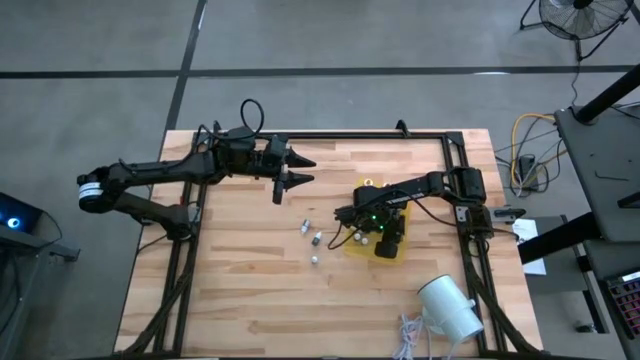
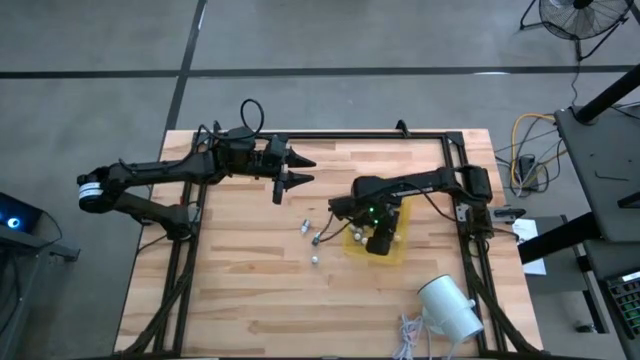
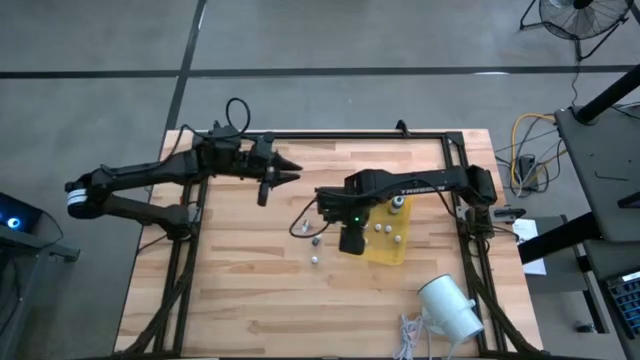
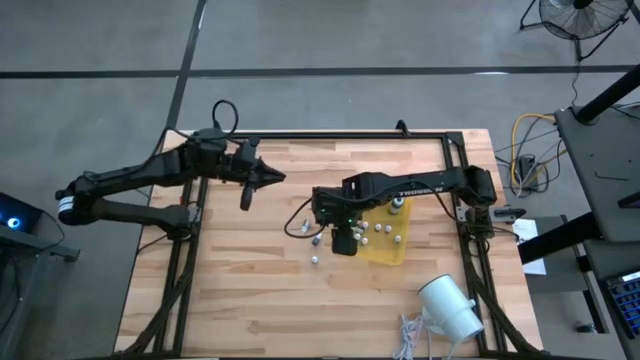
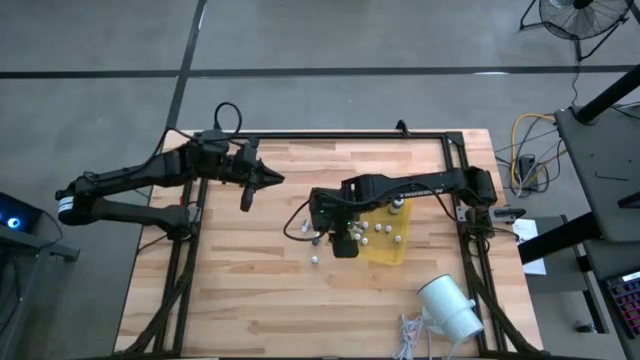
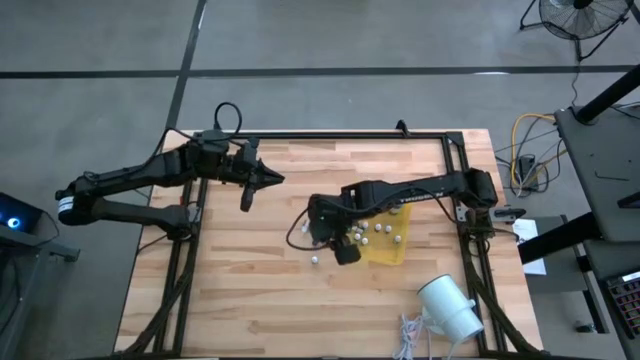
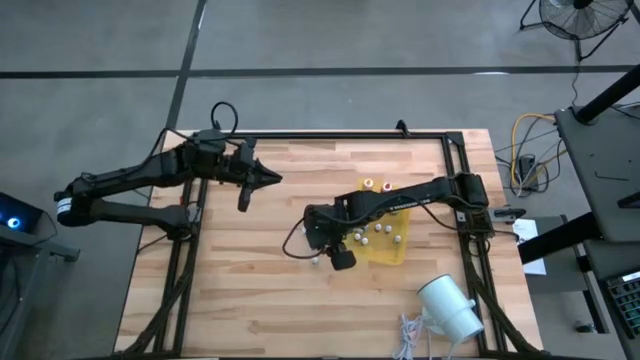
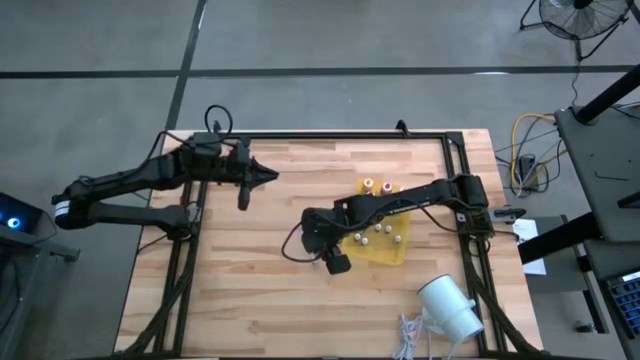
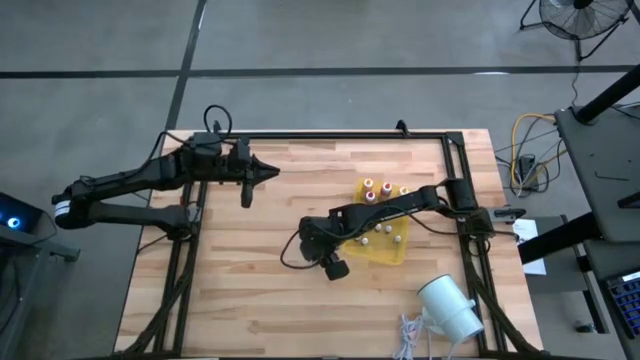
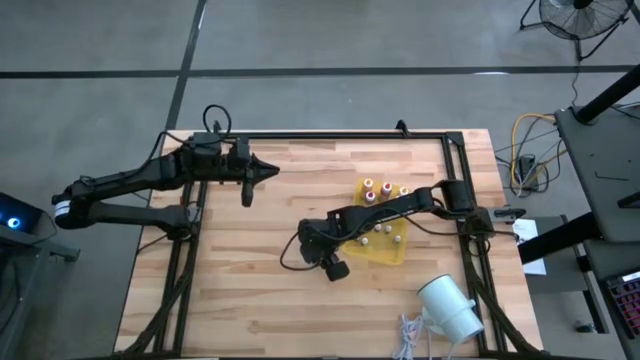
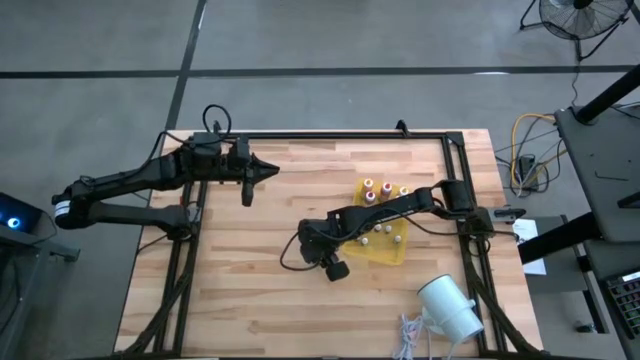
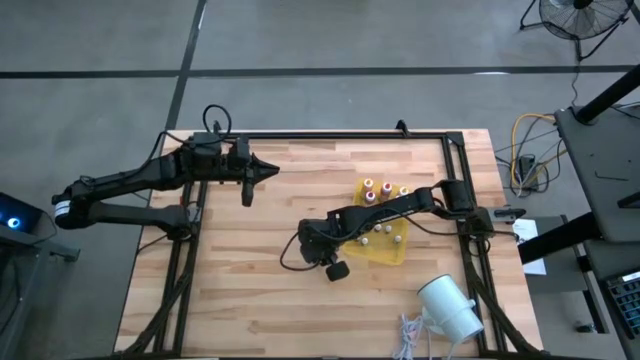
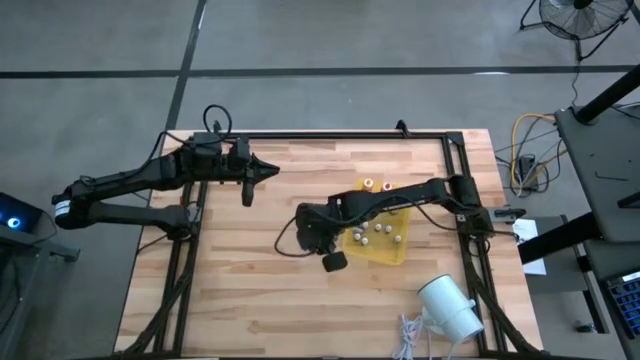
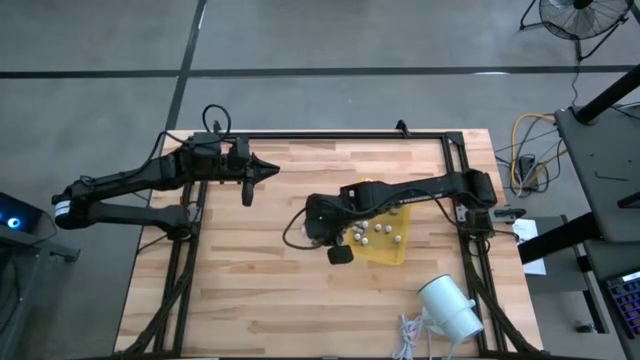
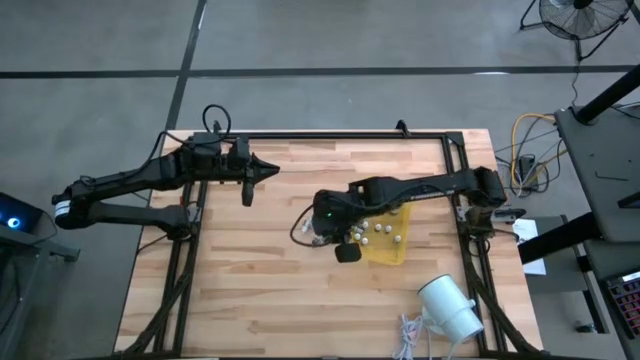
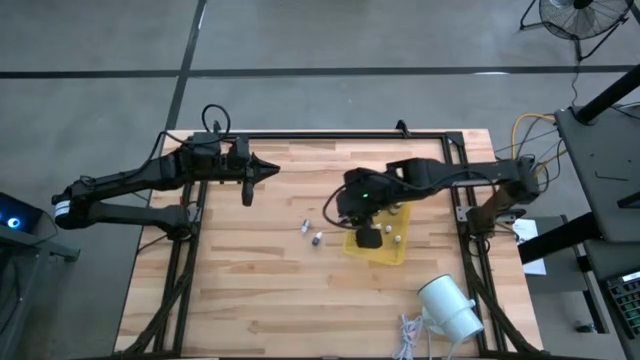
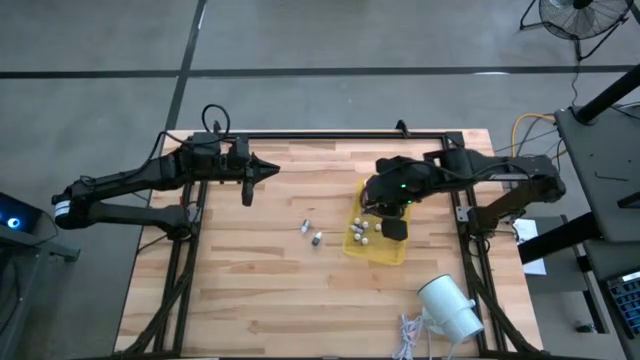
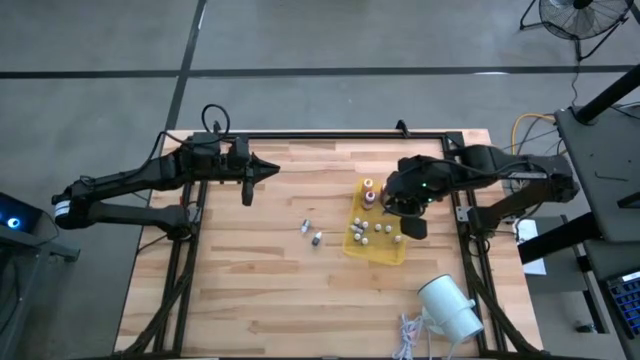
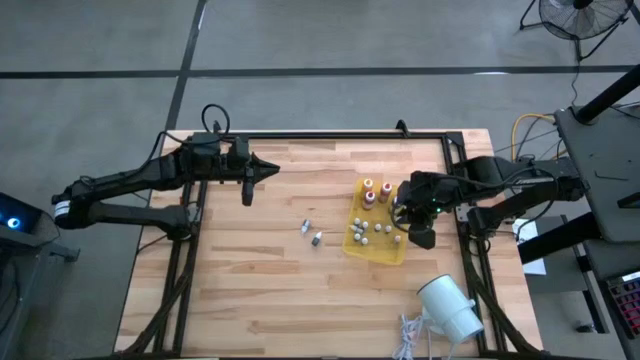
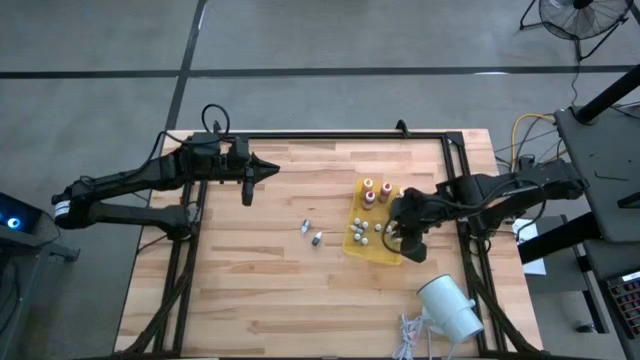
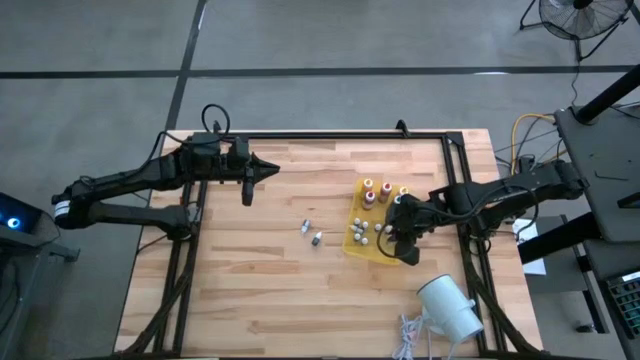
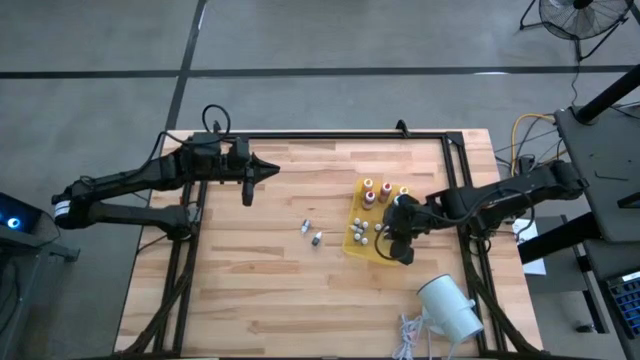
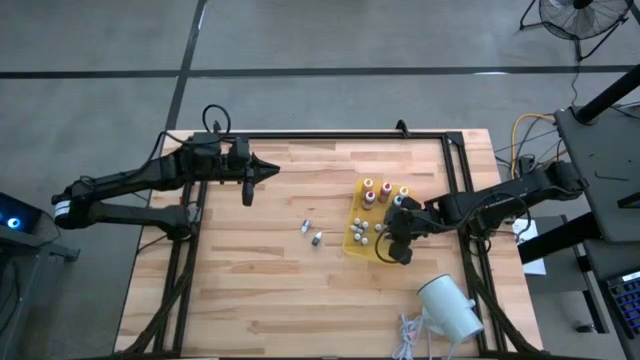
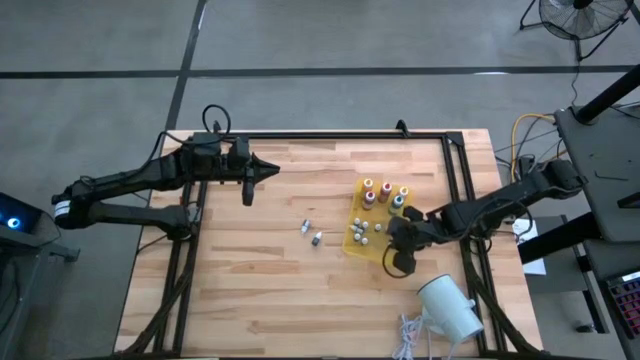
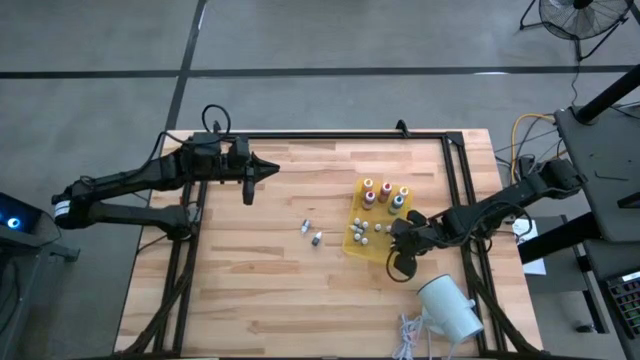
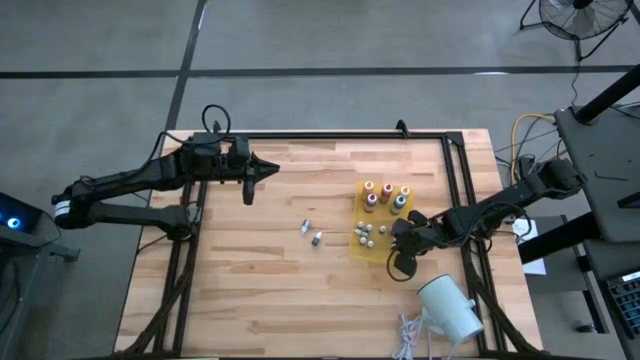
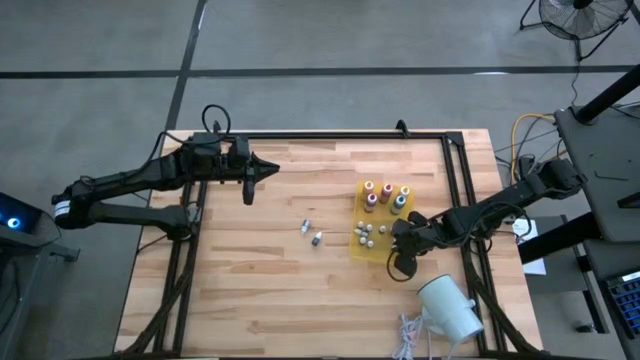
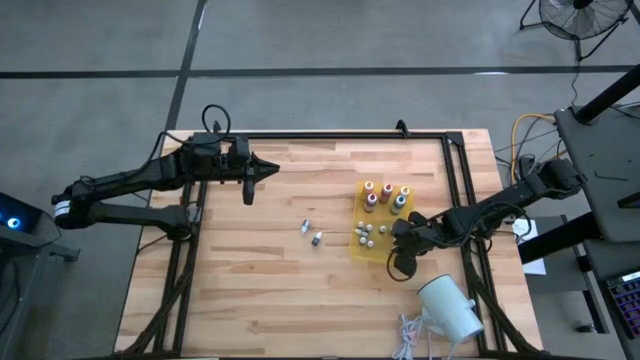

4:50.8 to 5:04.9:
Task: Pick & Place food coloring
Put the small green food coloring bottle into the yellow bin

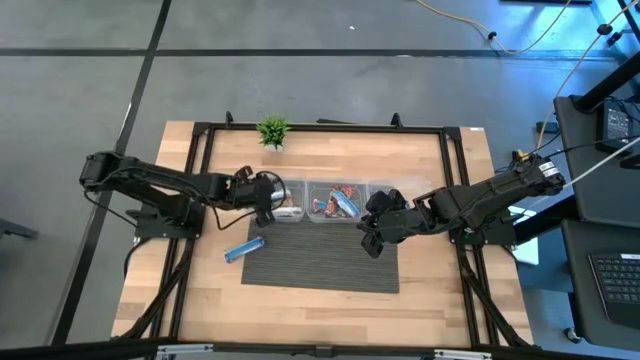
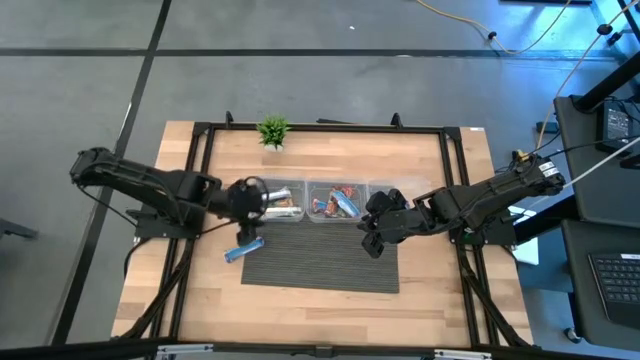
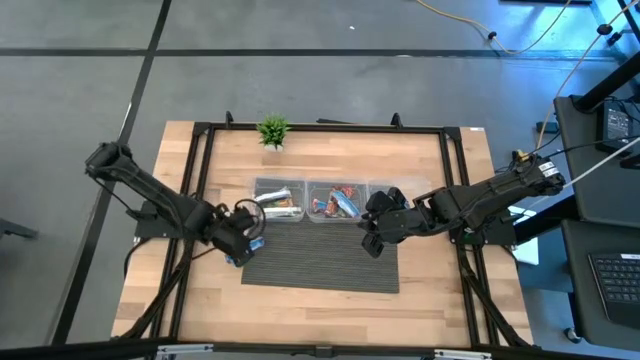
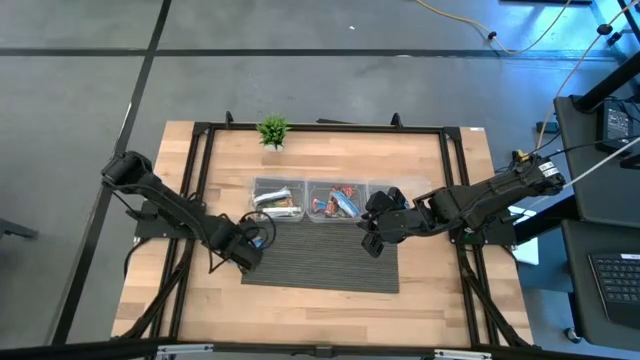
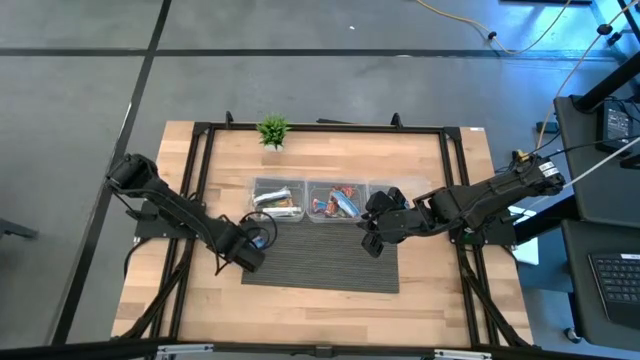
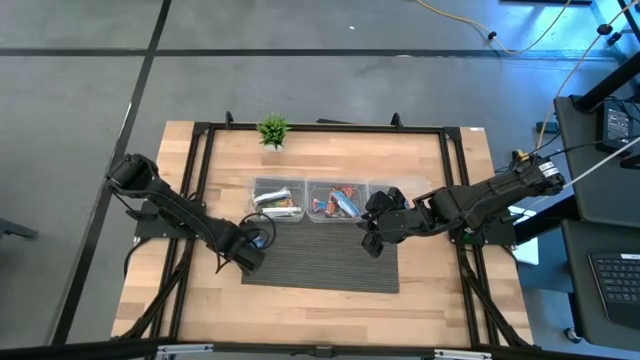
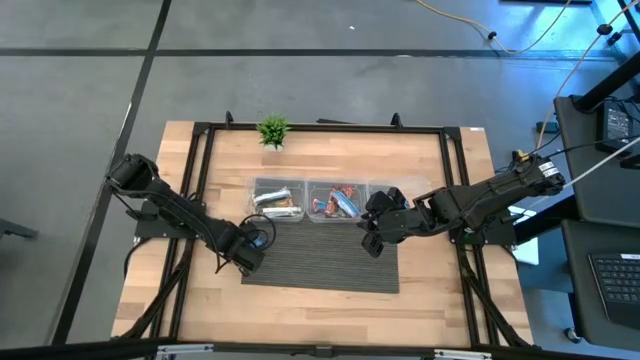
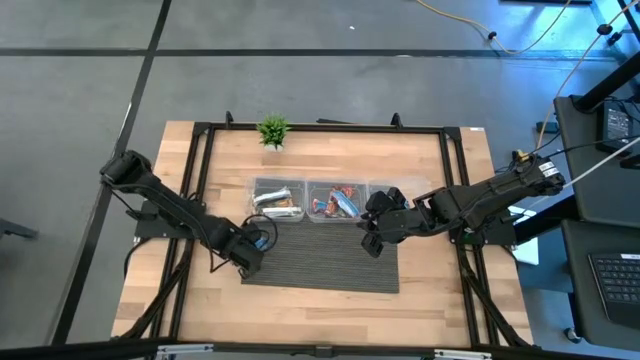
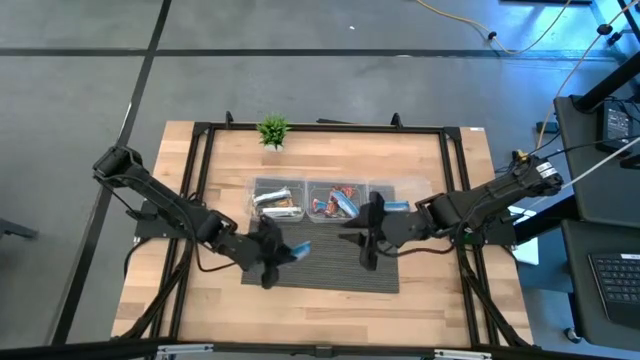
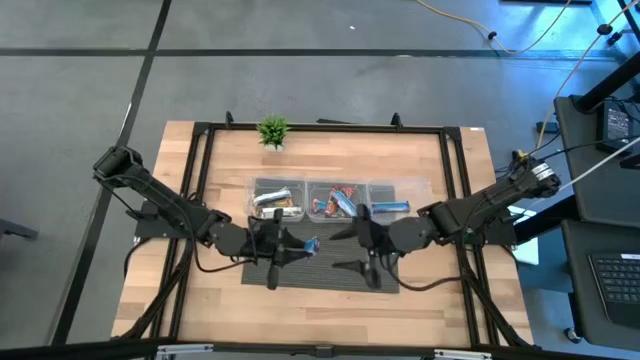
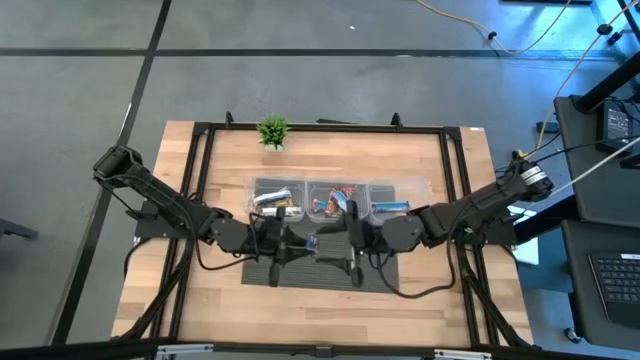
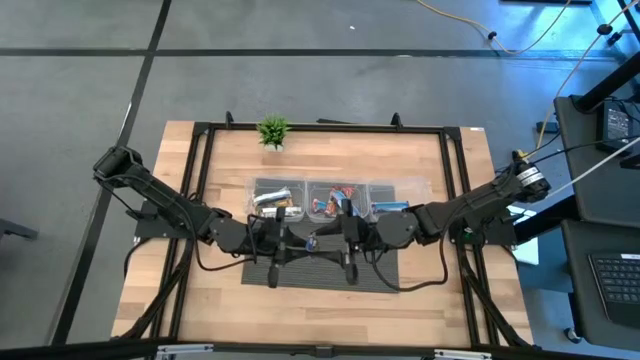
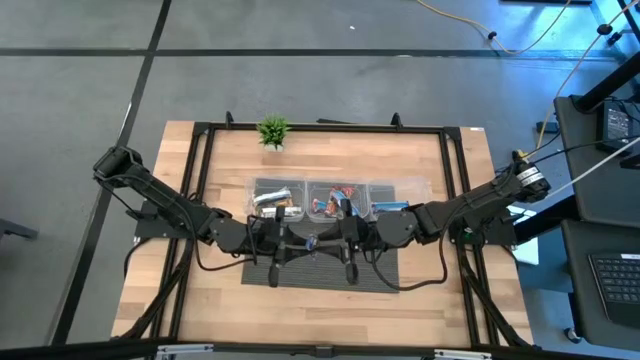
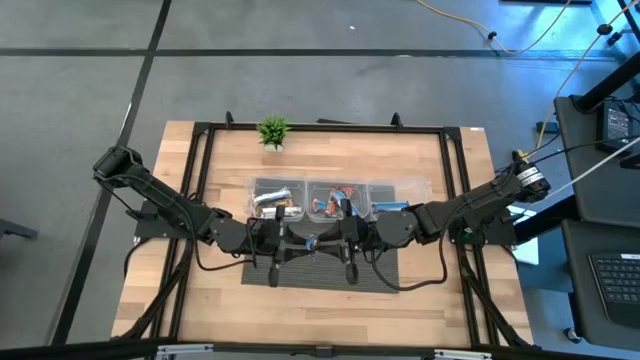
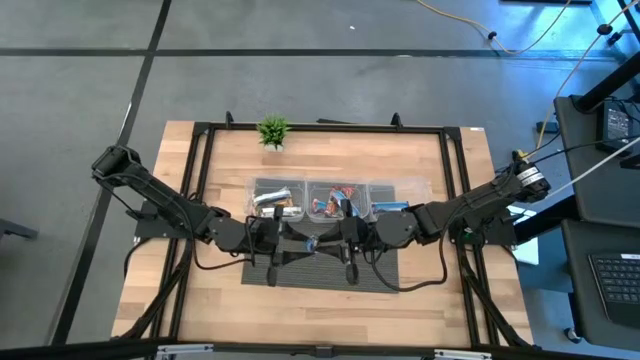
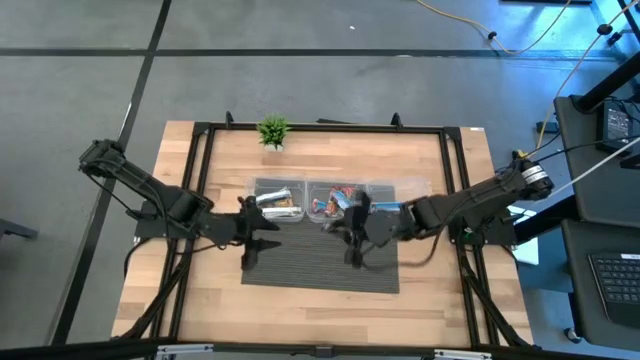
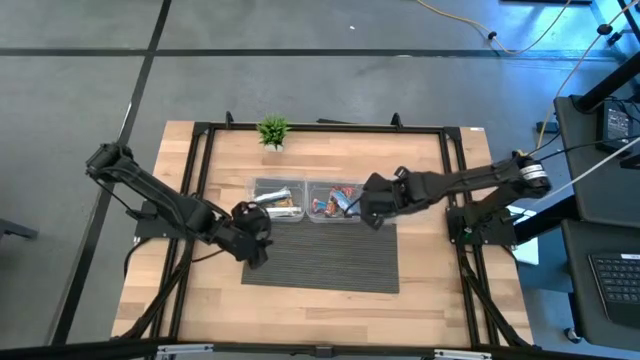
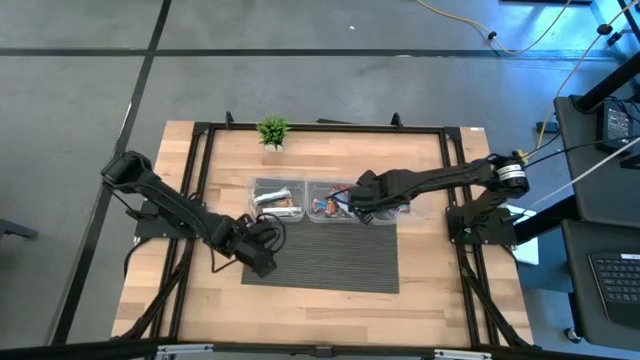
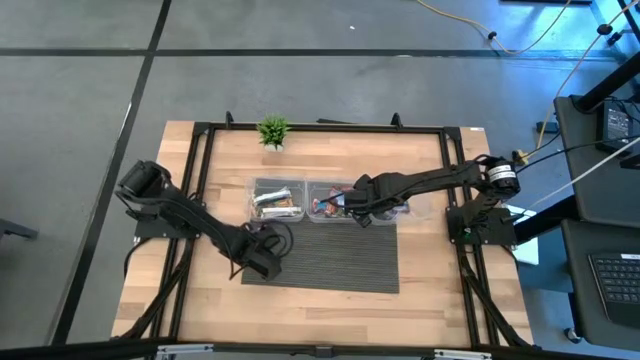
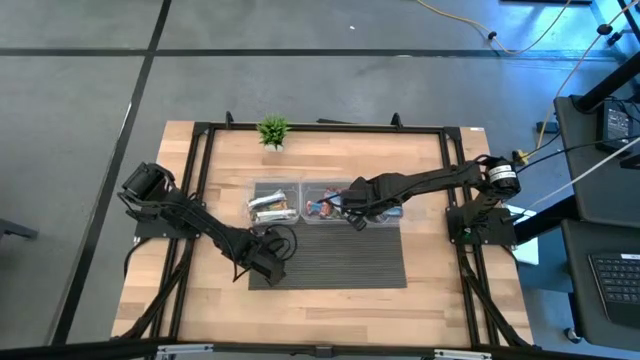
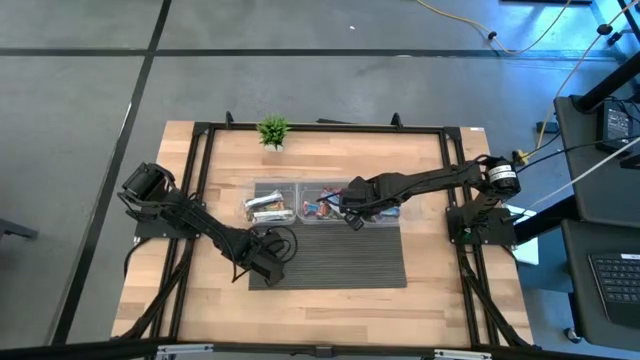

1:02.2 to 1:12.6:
Task: Pick and place Granola Bars by type
Put the blue granola bar into the right transparent bin
